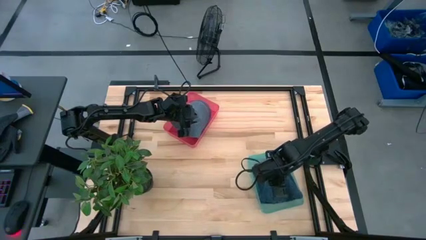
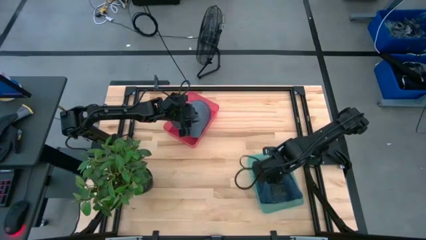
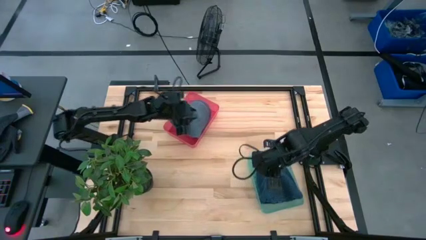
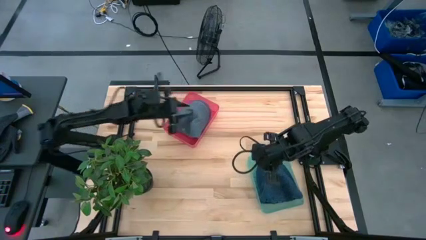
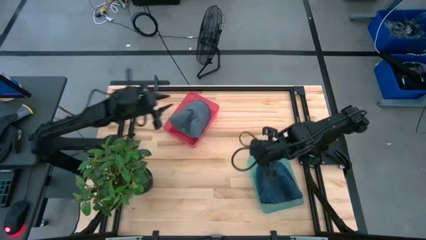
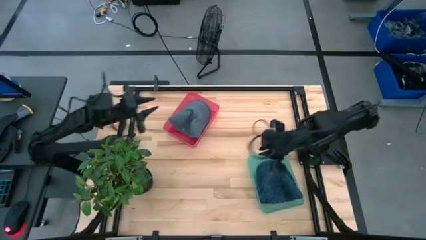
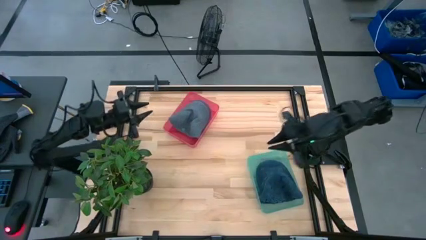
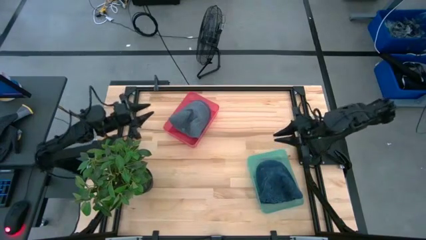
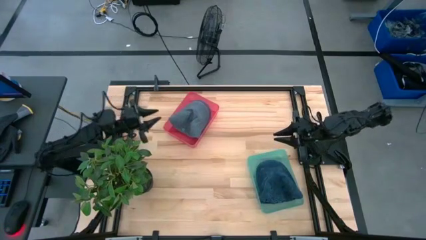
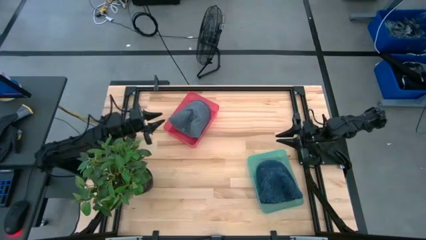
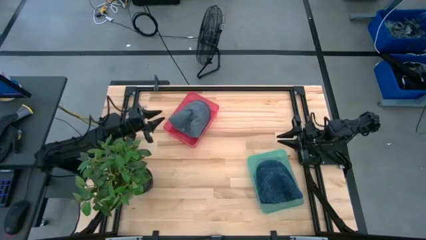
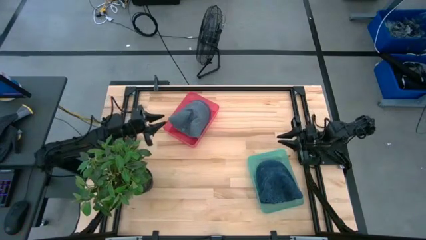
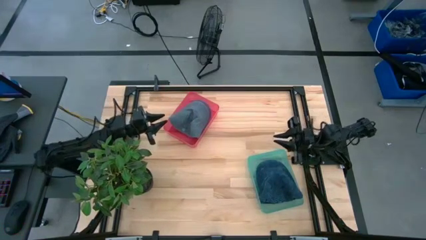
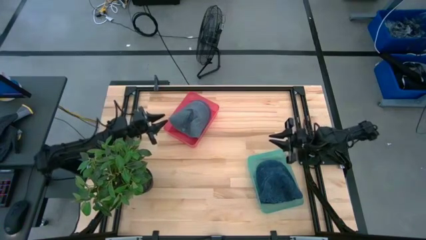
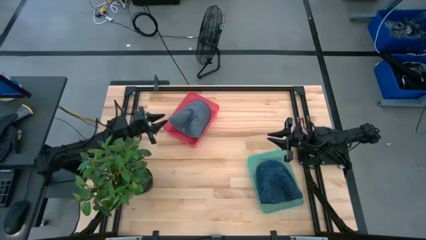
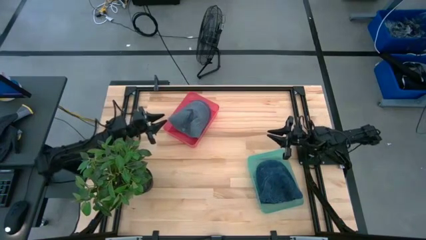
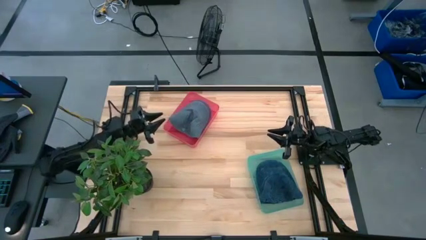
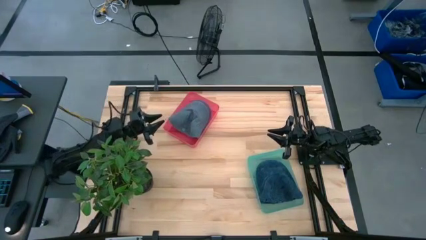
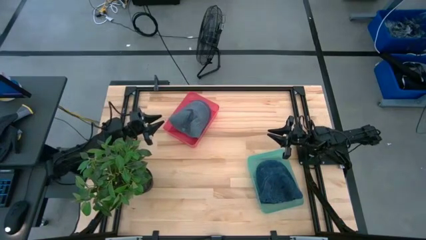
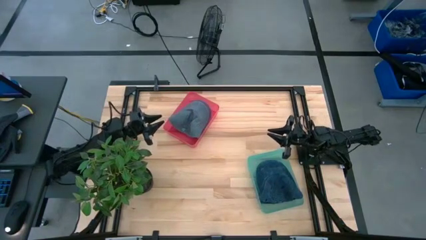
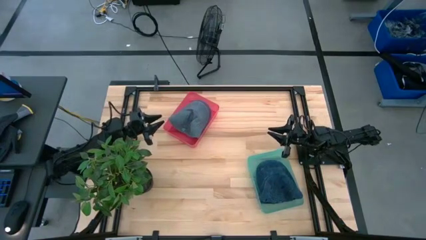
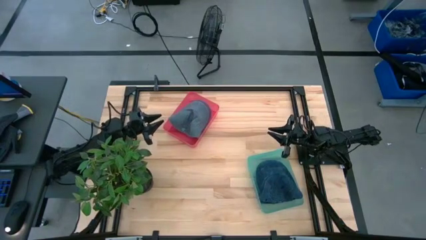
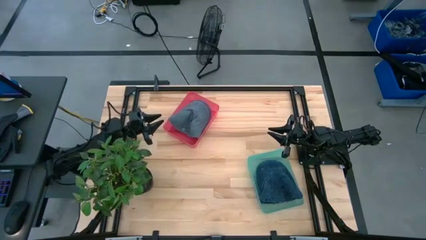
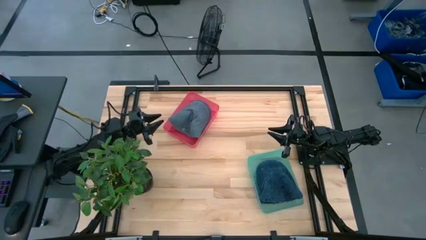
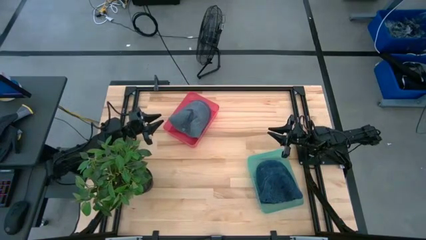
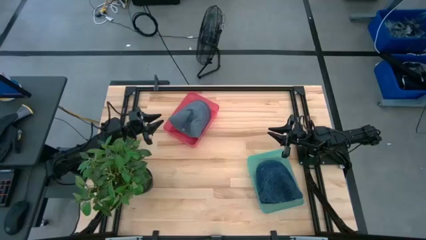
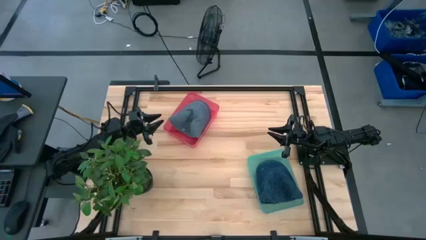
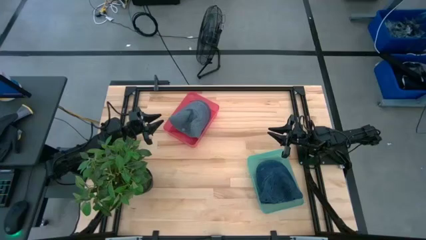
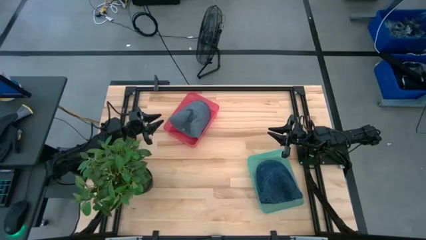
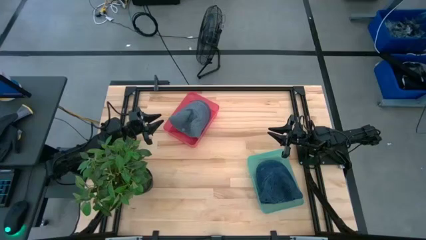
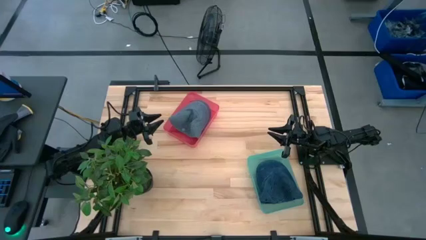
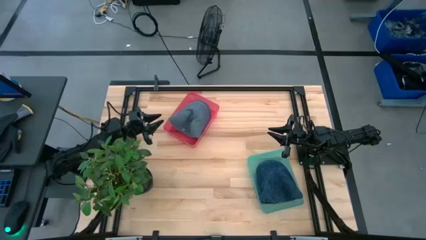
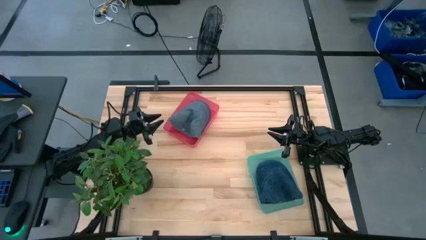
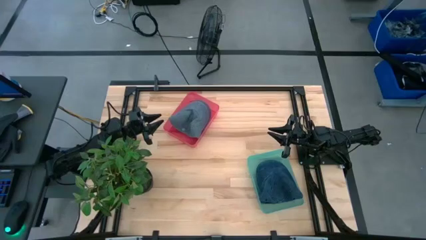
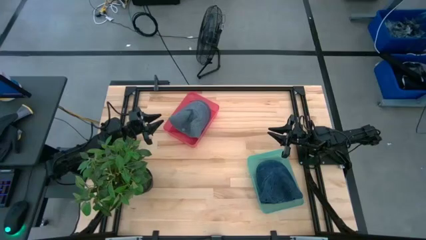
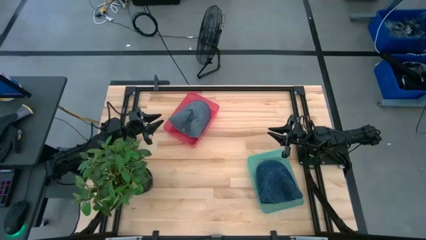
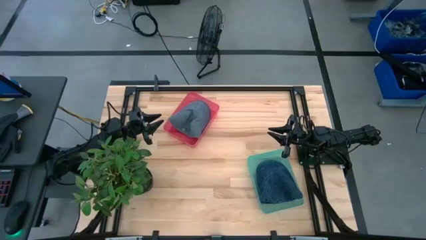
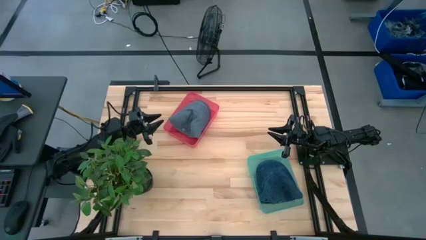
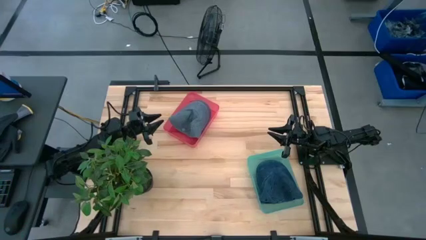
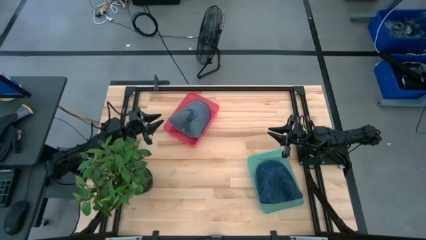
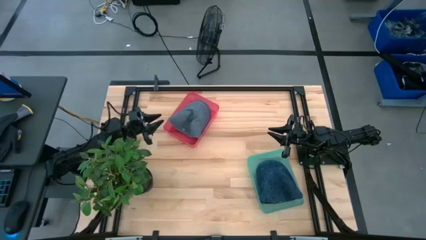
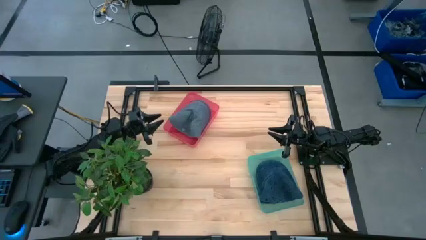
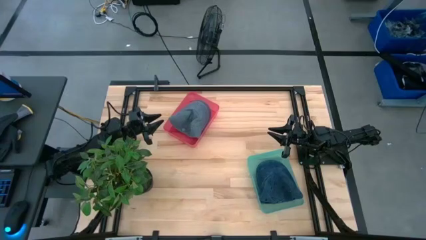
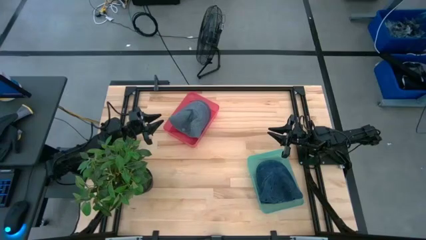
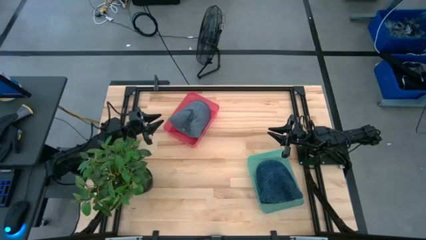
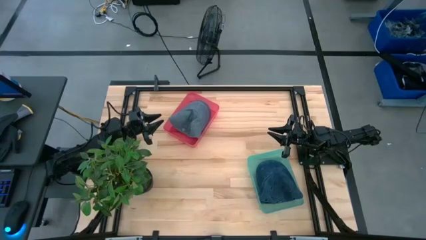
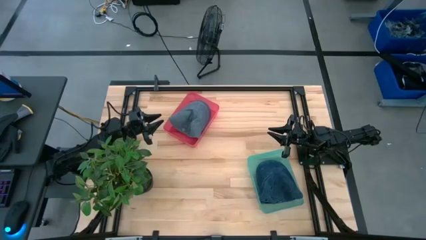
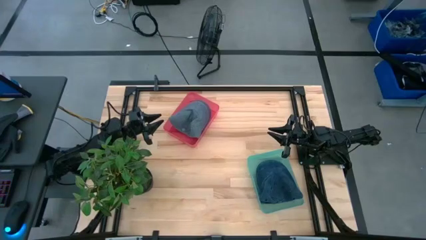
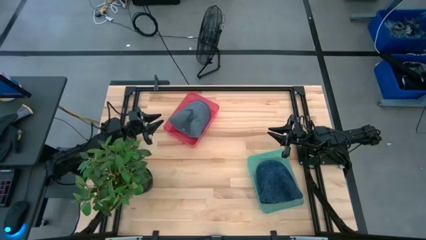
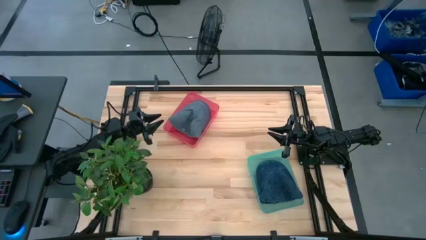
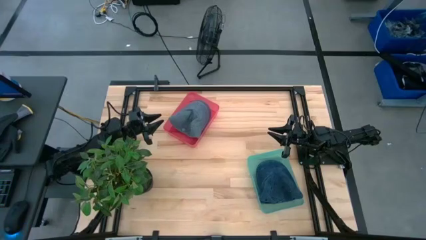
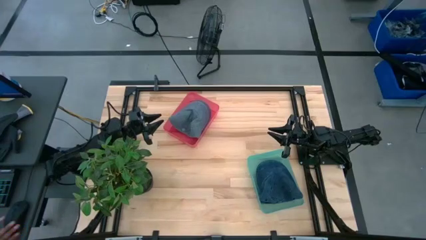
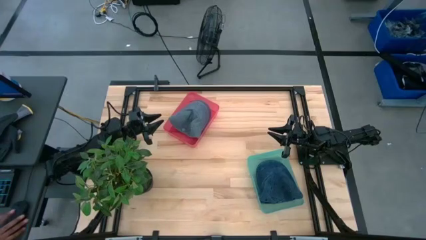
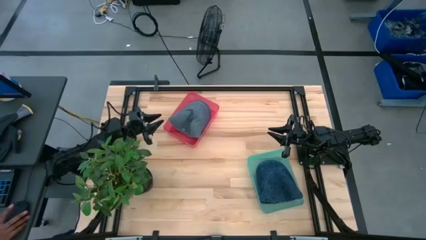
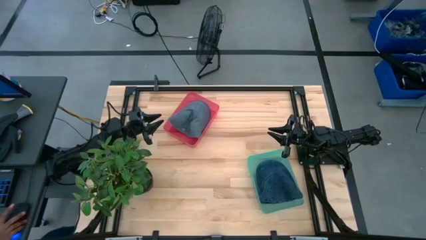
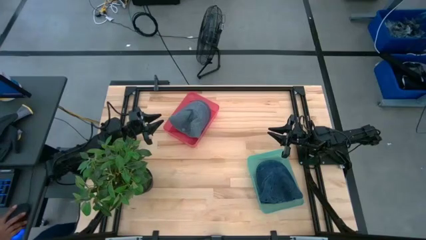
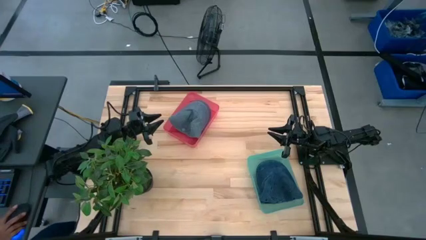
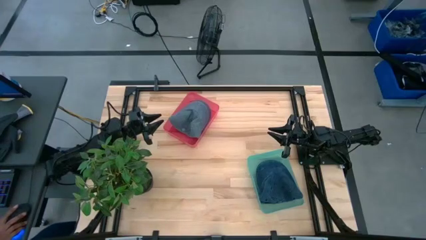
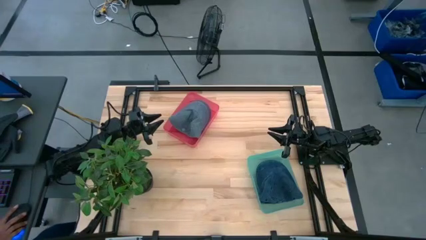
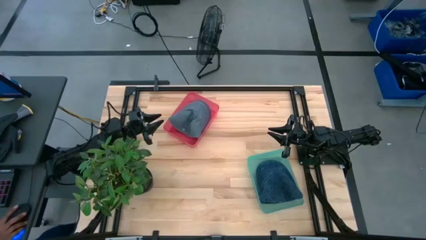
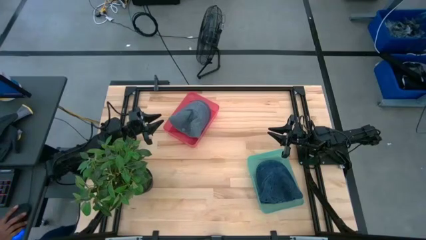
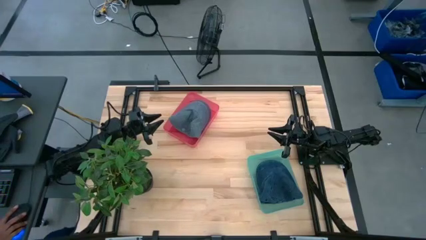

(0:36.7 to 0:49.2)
Task: Pick & Place hat
Return to Home Position
